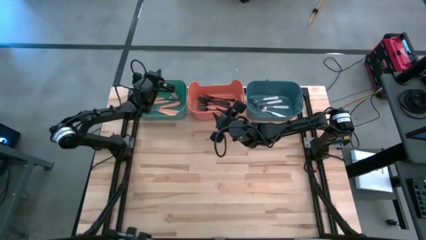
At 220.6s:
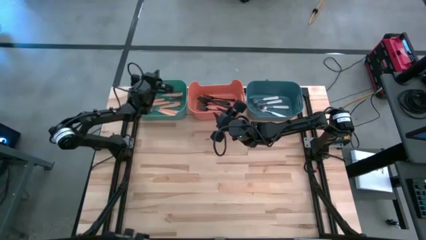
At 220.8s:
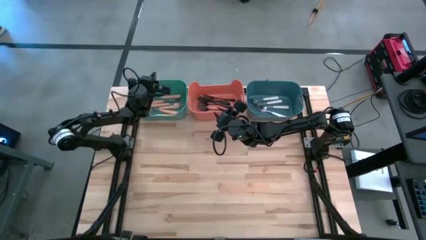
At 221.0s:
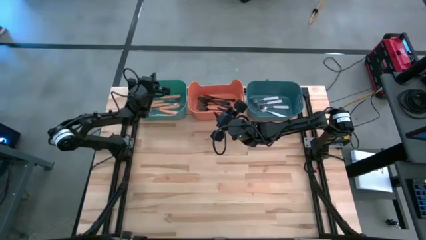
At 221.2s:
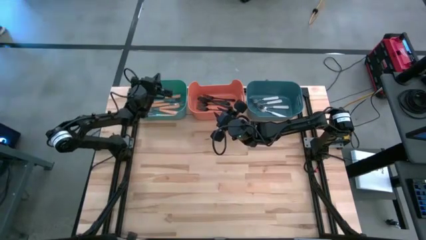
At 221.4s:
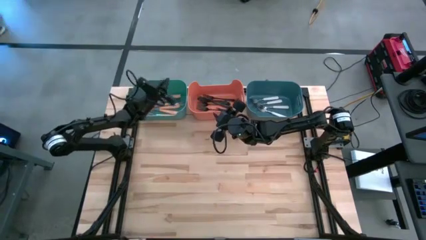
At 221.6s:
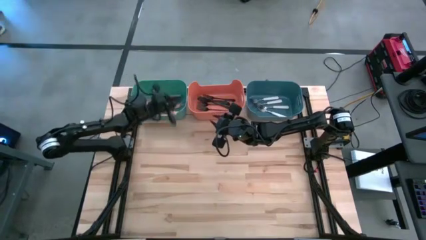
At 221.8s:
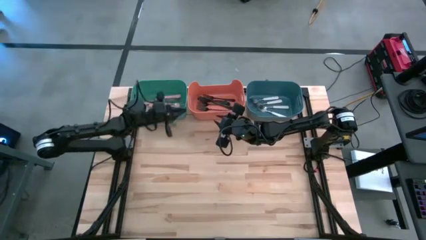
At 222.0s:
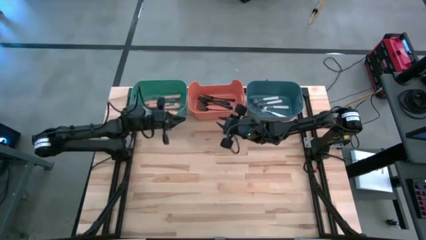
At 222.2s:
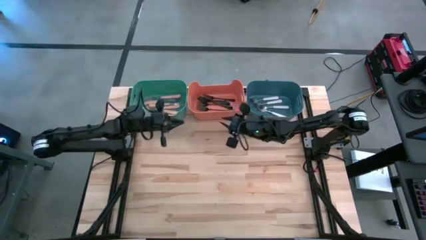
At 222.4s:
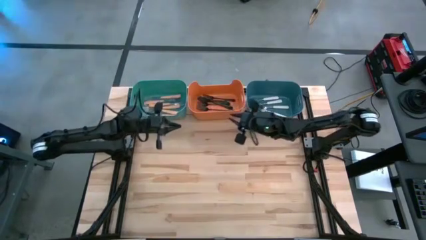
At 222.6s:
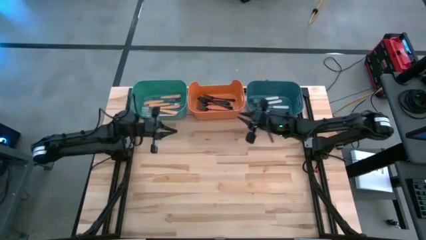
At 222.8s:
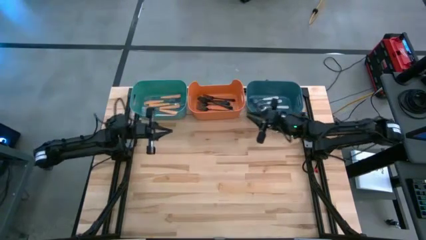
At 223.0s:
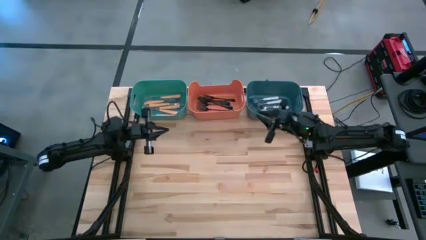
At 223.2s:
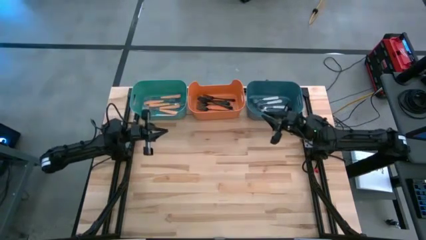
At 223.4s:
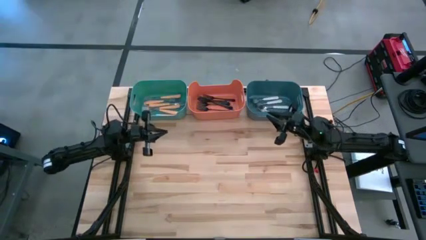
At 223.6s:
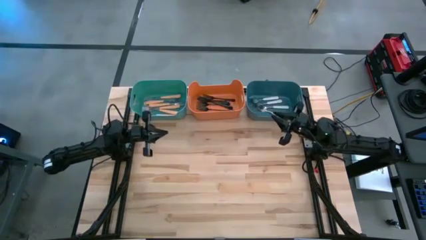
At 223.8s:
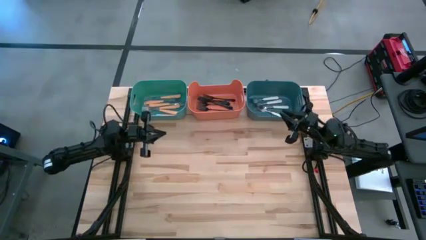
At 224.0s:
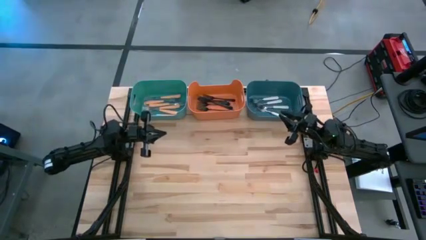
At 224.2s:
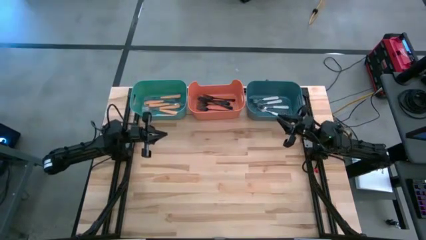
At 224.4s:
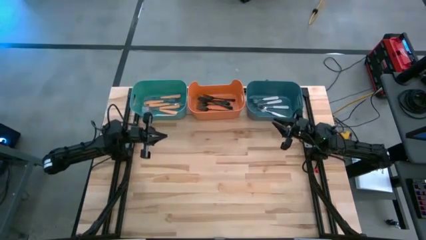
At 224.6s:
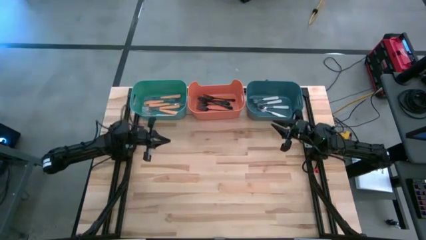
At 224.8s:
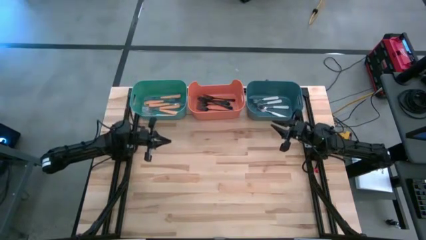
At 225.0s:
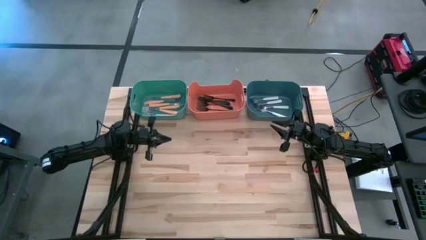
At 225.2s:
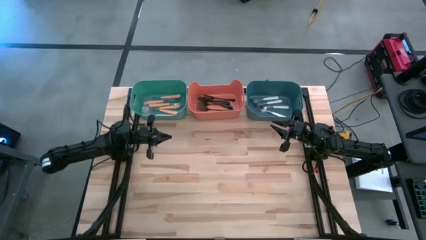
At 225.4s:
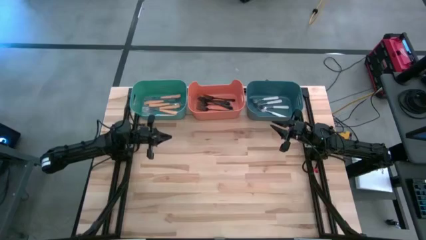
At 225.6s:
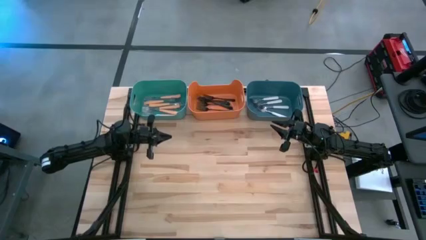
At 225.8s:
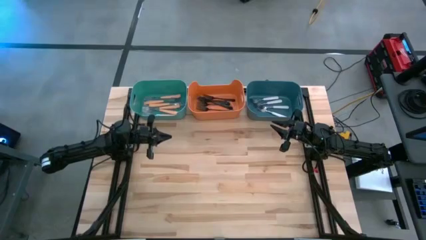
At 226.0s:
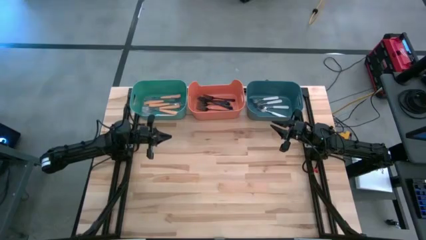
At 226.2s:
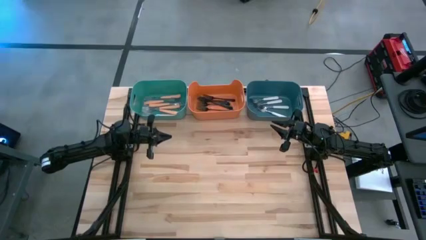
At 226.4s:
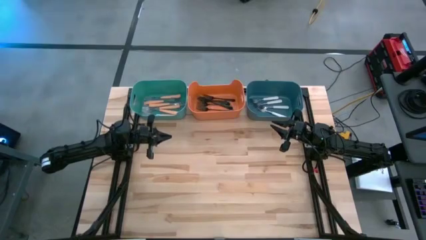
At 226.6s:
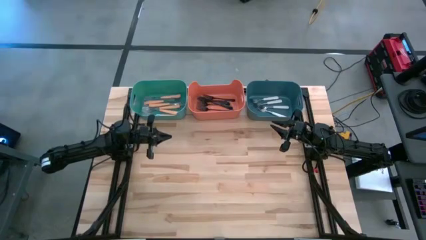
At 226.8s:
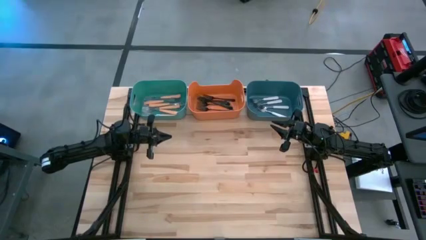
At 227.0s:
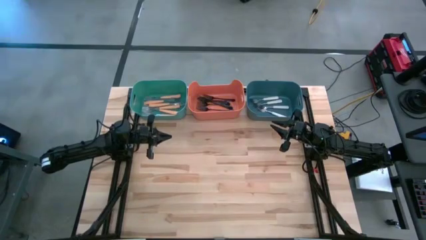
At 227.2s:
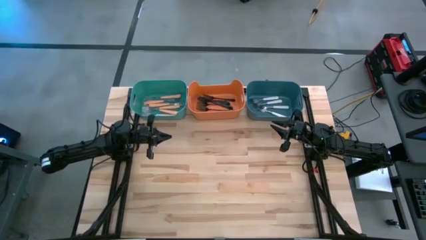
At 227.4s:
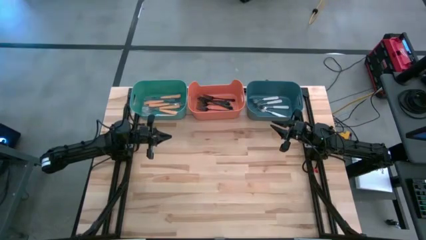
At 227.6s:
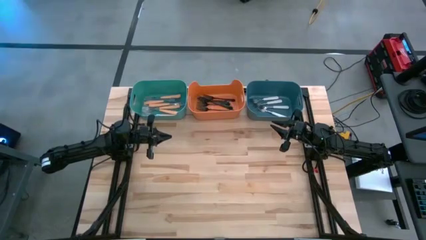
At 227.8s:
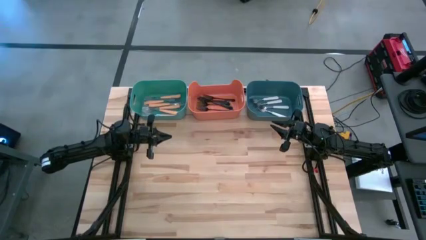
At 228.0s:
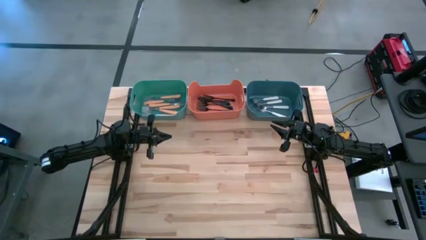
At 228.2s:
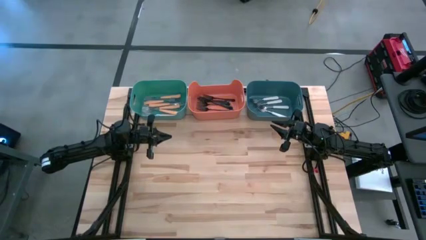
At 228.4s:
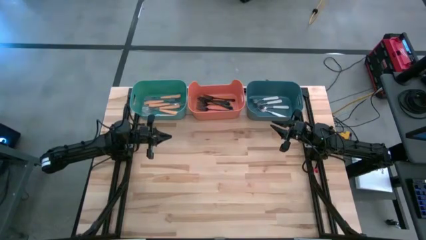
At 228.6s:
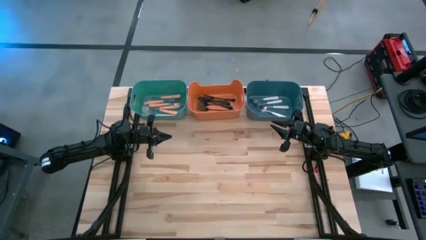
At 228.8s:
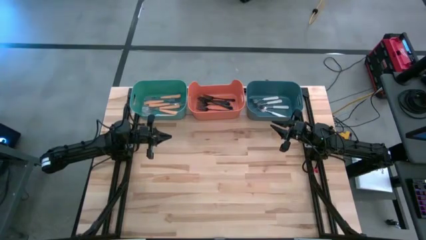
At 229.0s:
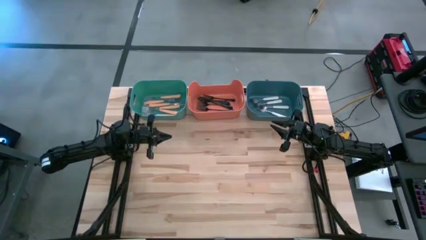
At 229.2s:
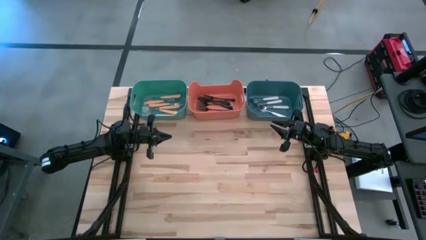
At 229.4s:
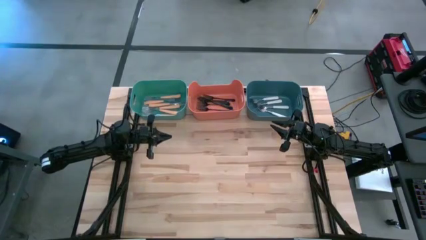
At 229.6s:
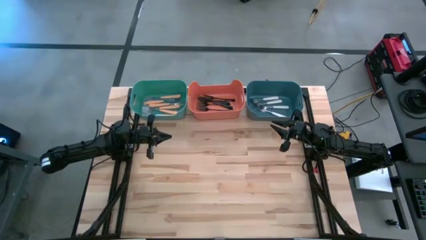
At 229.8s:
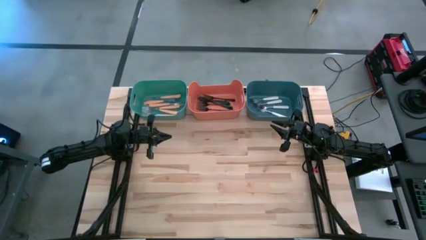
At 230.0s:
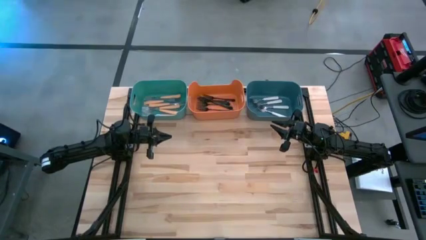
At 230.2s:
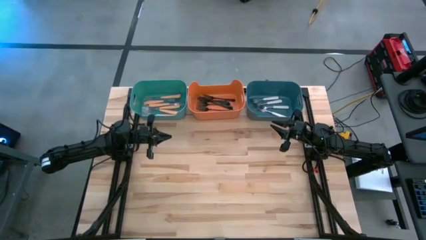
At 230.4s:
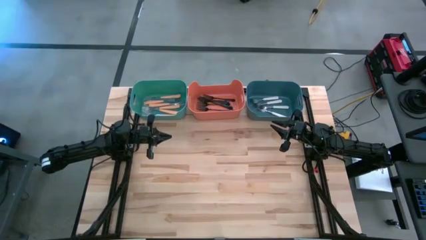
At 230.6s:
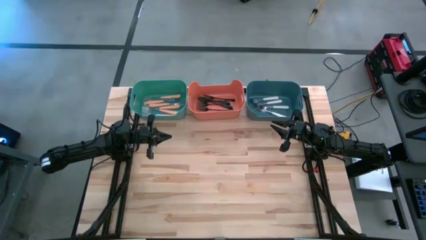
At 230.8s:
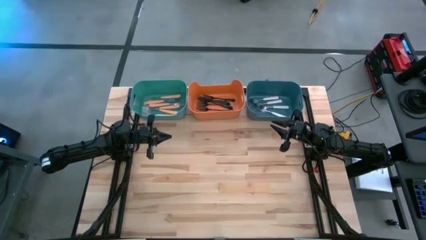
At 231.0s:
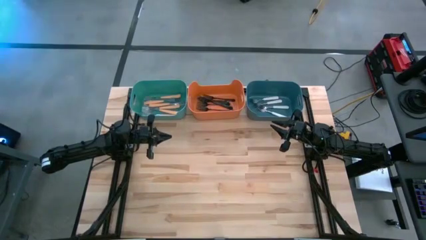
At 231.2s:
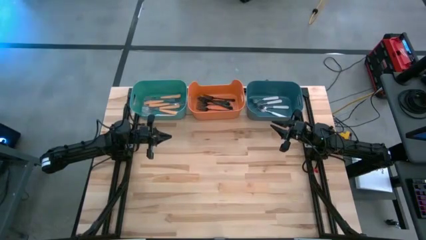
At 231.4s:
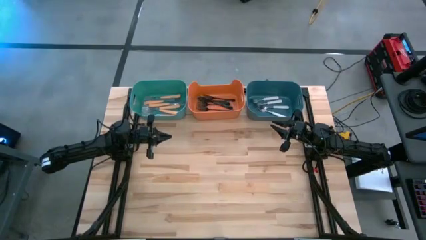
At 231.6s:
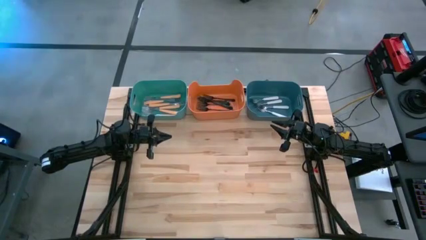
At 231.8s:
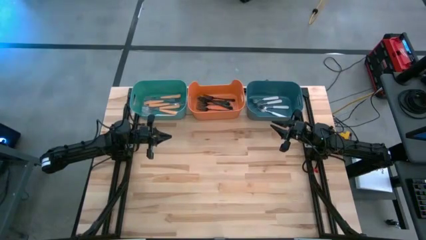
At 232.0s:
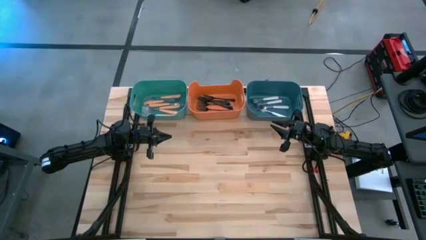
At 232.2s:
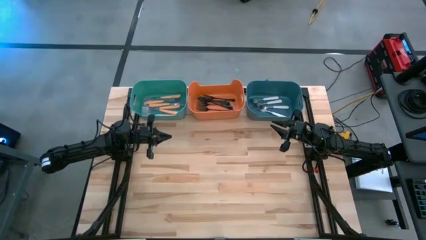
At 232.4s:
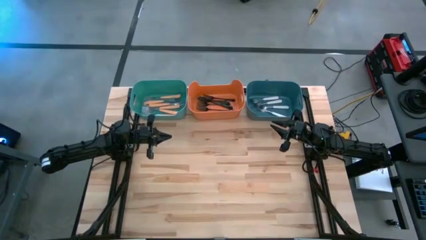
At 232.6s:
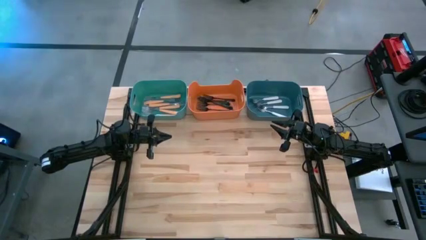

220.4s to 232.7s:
Task: Sort silverware by color (type)
Return to Home Position

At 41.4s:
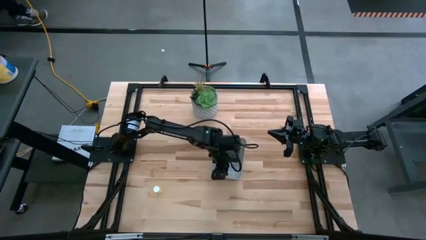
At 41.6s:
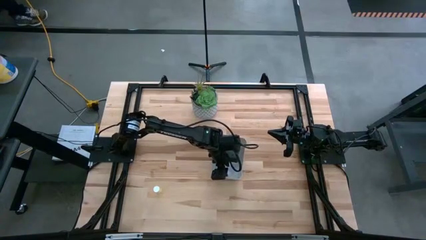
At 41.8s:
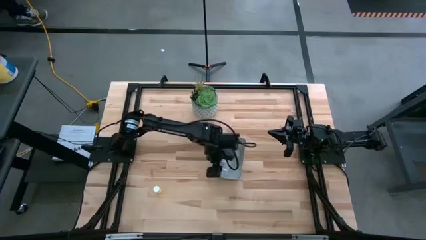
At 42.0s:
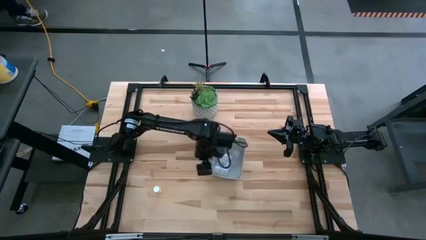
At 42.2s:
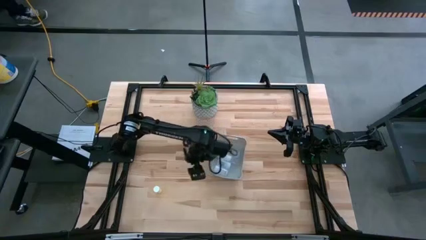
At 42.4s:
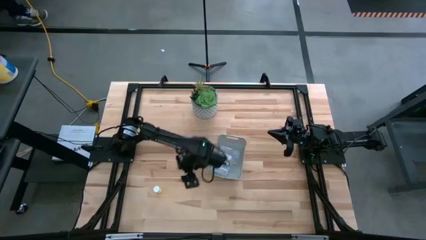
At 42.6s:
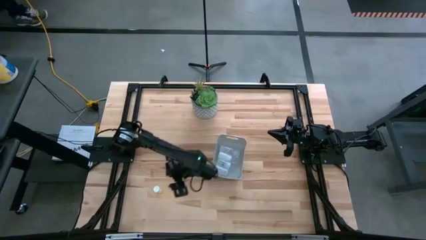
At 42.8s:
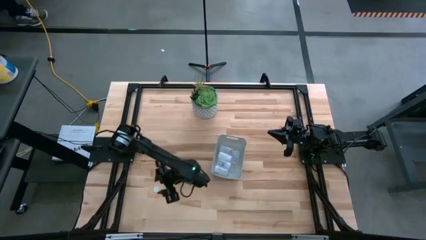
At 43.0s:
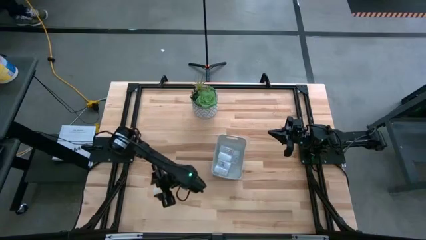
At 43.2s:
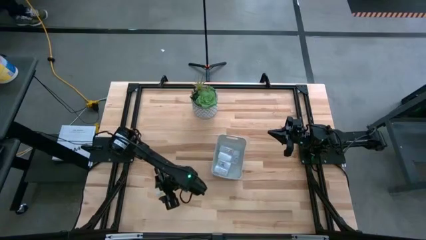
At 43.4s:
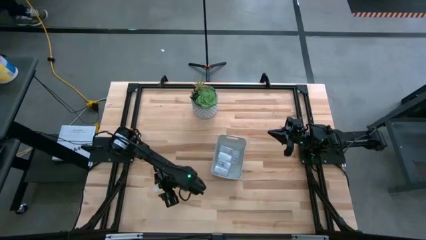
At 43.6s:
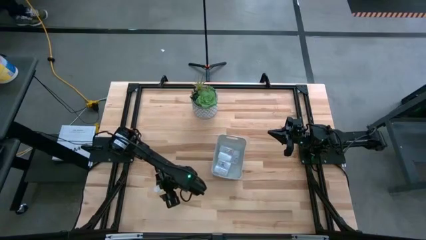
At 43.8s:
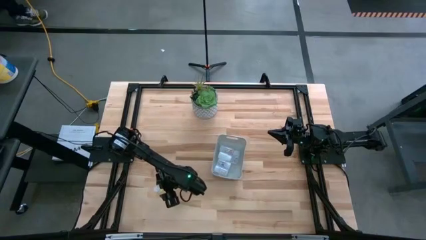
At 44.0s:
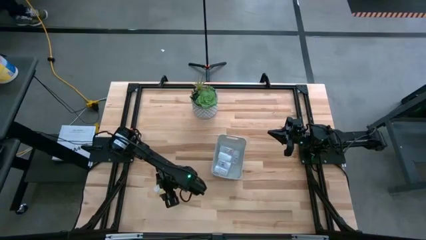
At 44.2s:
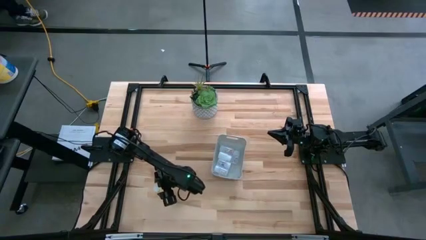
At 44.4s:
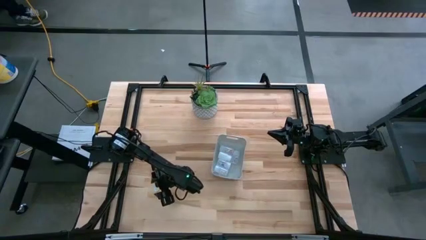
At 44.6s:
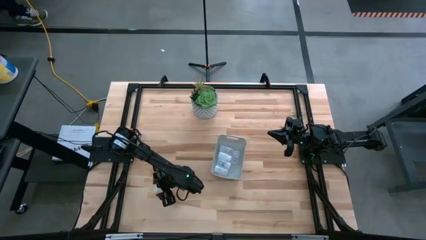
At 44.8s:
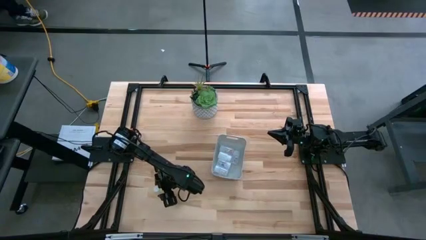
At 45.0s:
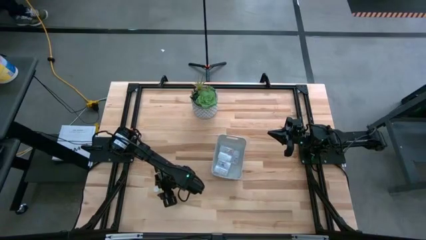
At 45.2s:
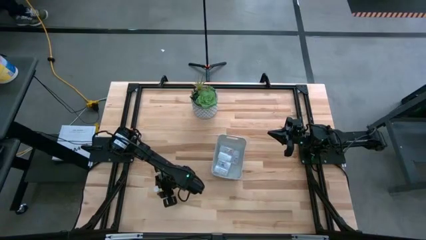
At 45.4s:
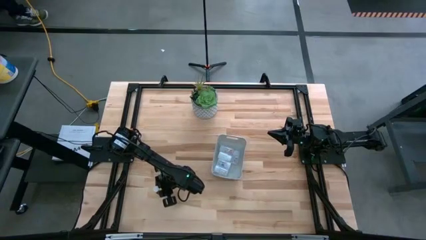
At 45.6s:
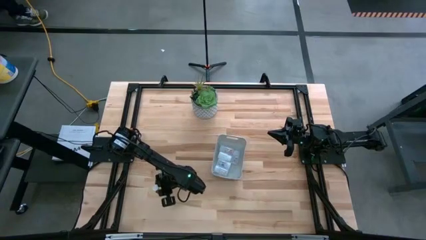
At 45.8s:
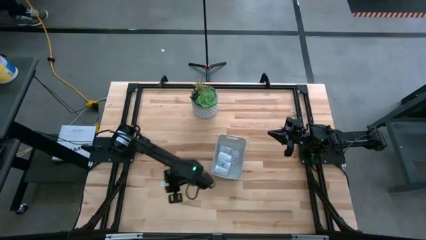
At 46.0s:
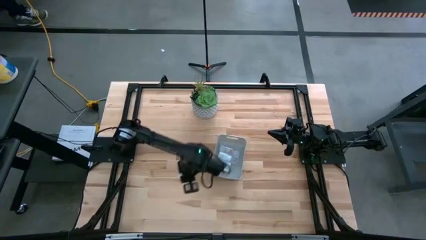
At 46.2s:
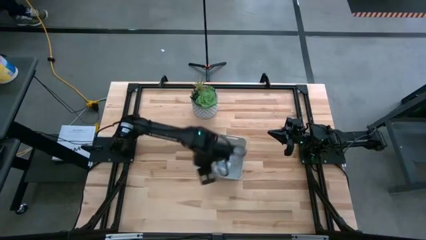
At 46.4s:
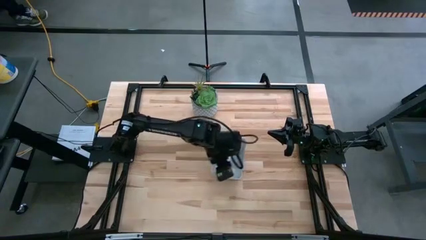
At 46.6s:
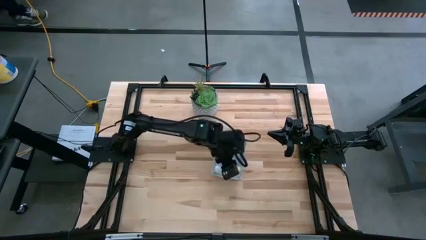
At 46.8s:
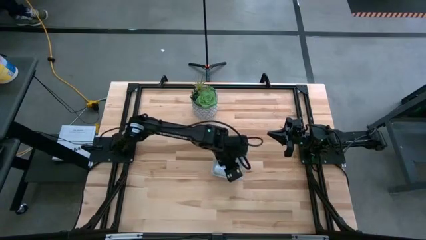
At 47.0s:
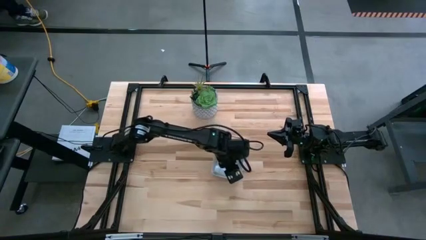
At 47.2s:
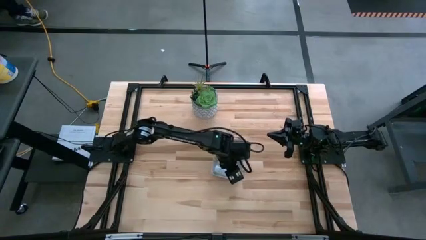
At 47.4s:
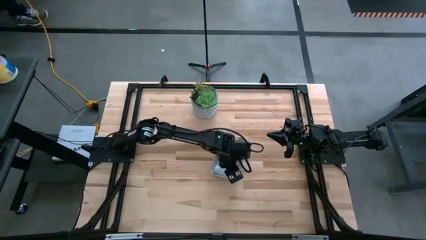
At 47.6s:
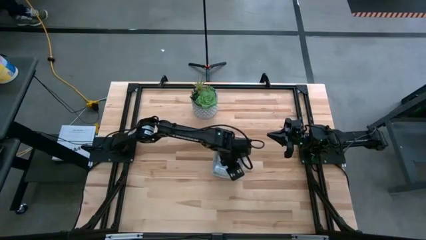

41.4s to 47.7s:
Task: Pick and place pill bottles into a basket
Put the yellow medicine bottle into the white bin
